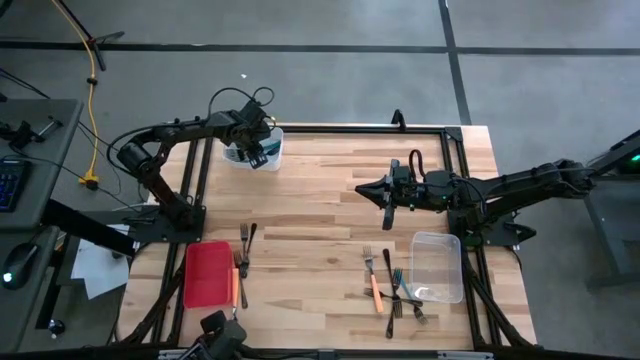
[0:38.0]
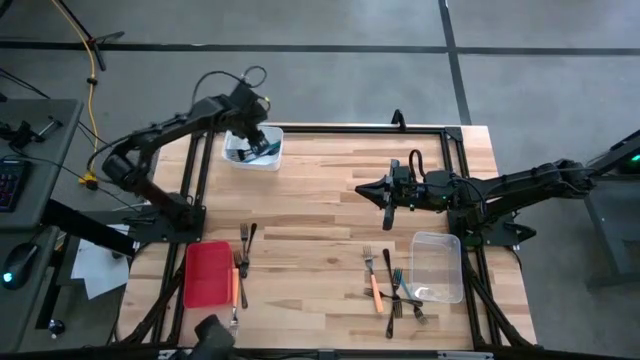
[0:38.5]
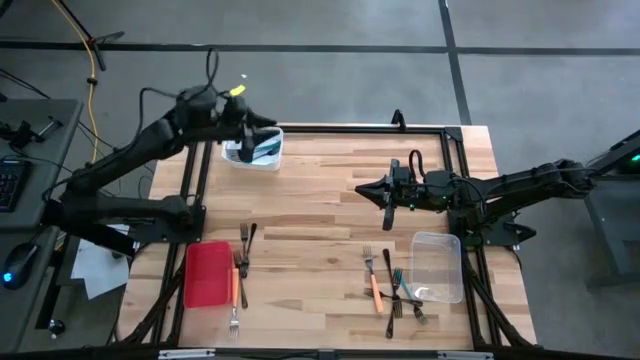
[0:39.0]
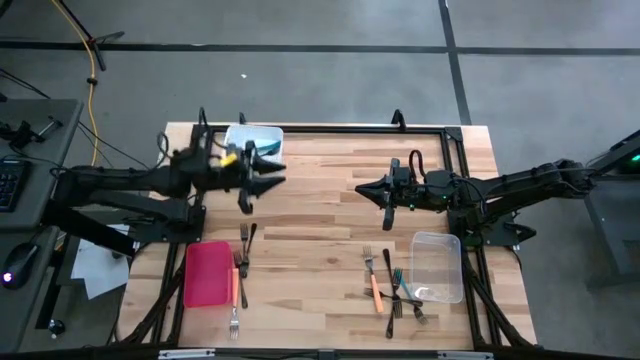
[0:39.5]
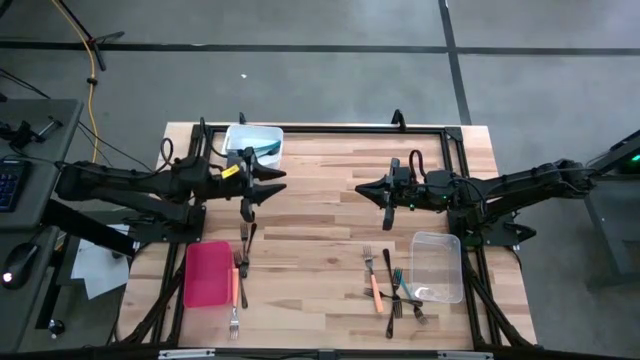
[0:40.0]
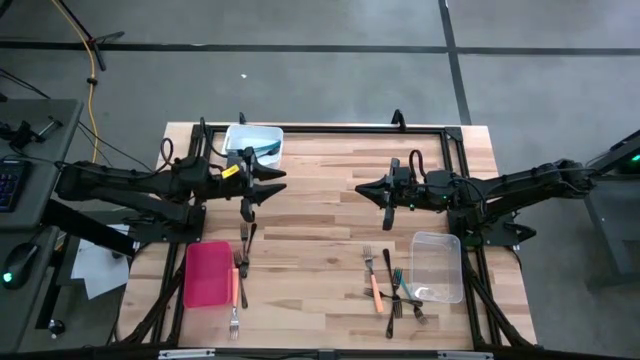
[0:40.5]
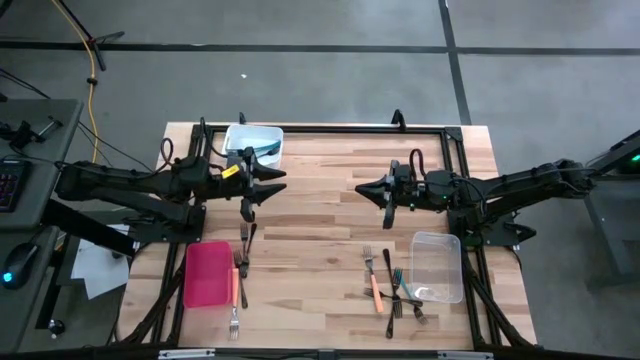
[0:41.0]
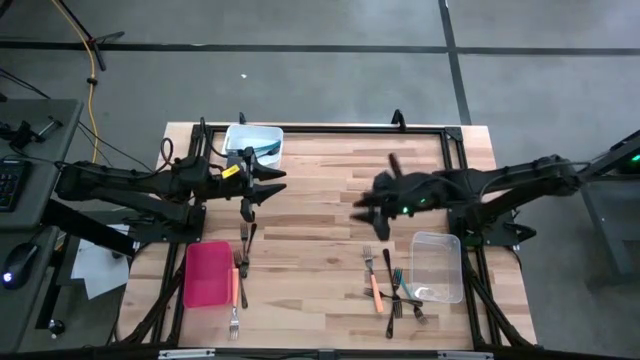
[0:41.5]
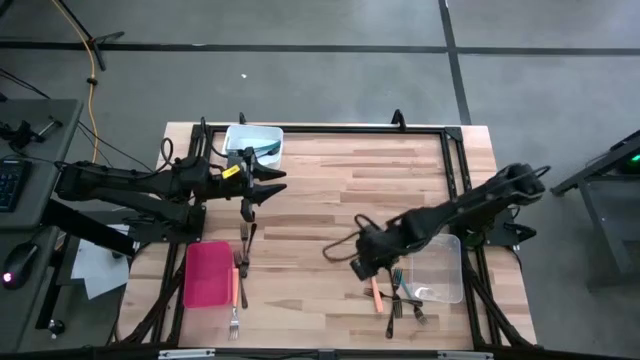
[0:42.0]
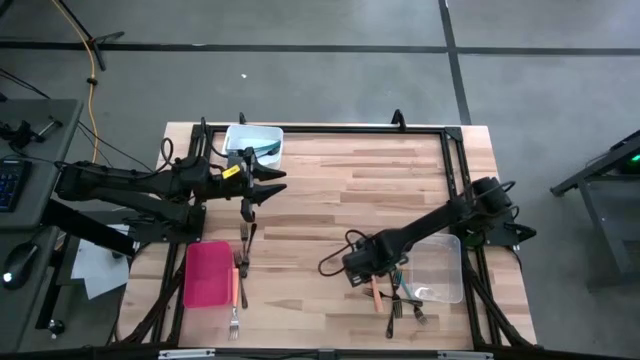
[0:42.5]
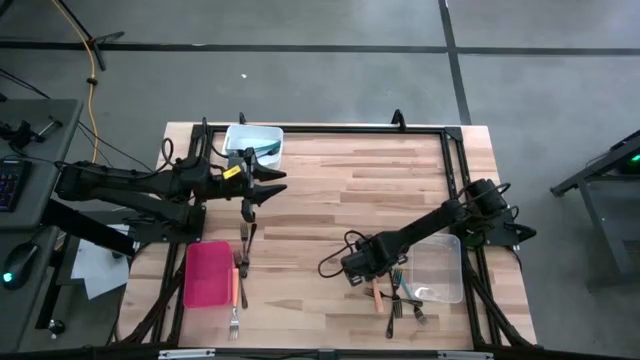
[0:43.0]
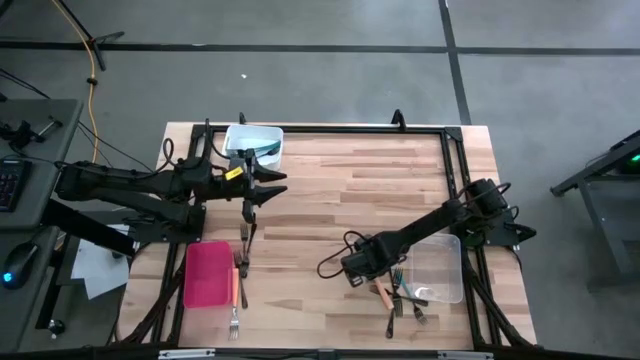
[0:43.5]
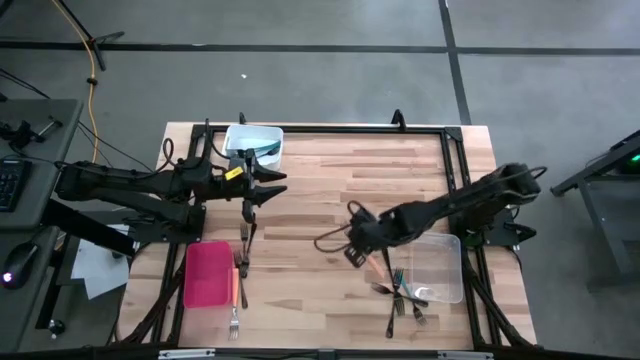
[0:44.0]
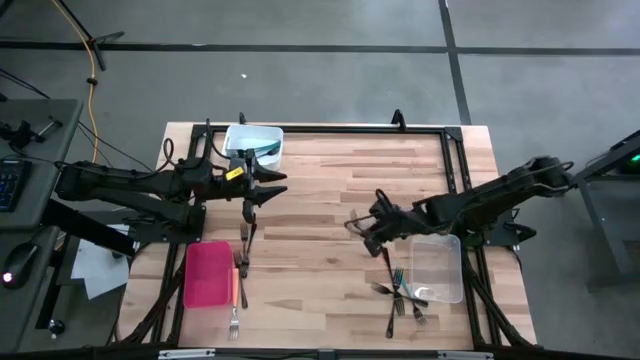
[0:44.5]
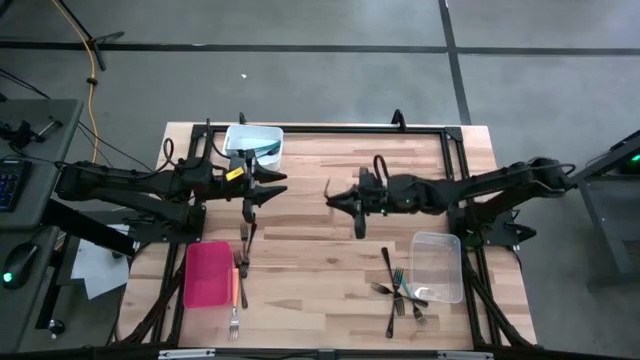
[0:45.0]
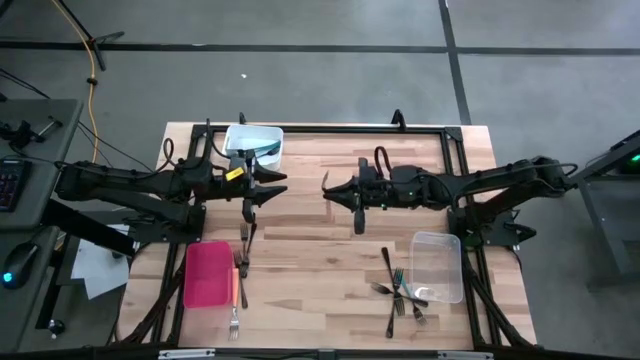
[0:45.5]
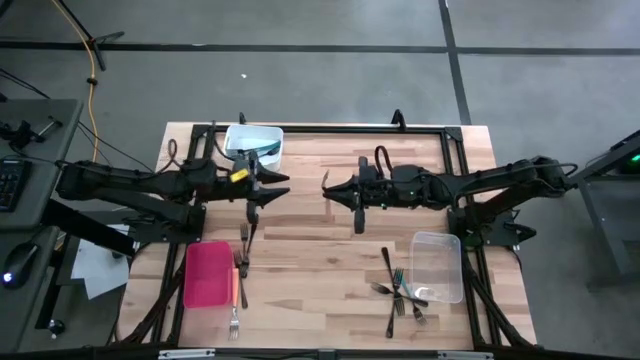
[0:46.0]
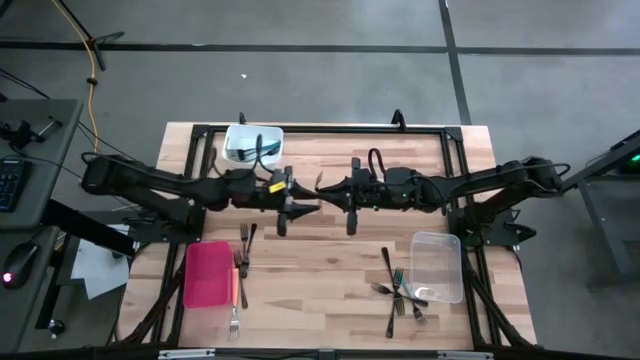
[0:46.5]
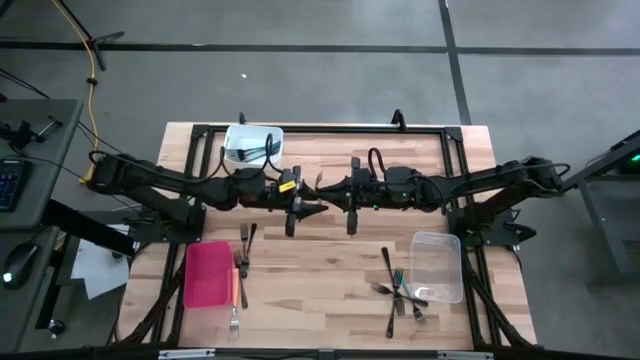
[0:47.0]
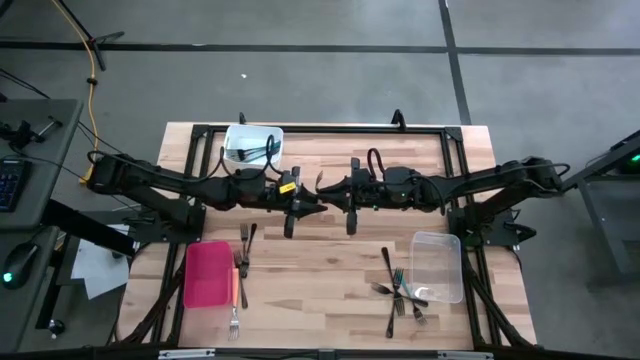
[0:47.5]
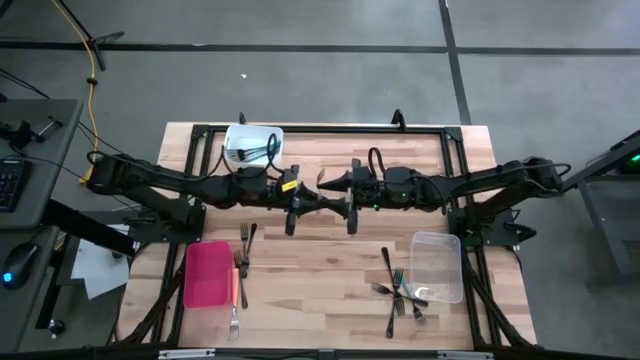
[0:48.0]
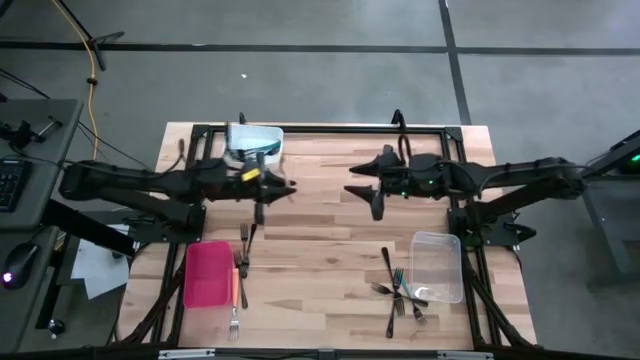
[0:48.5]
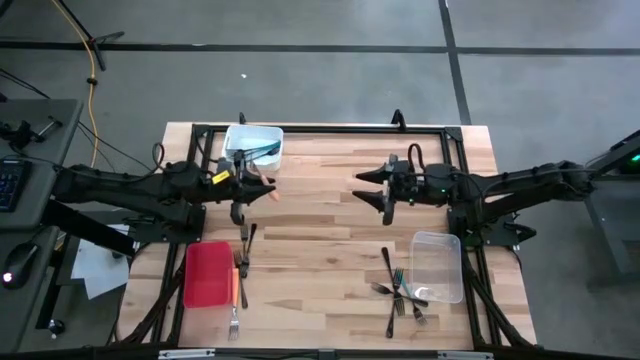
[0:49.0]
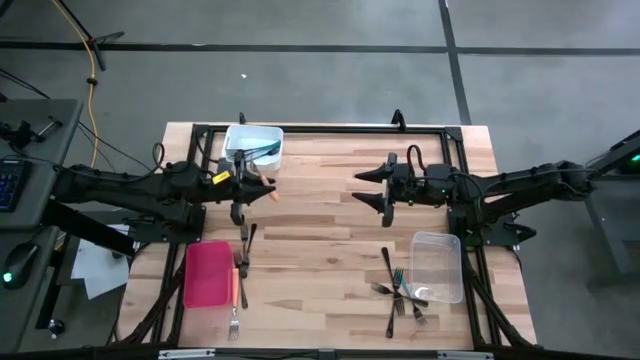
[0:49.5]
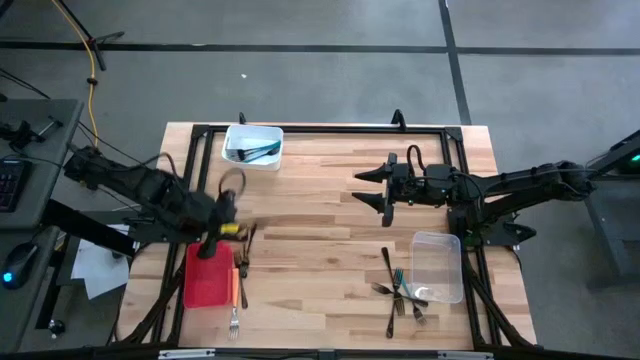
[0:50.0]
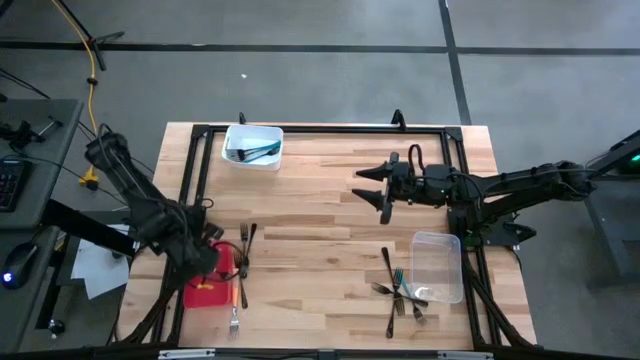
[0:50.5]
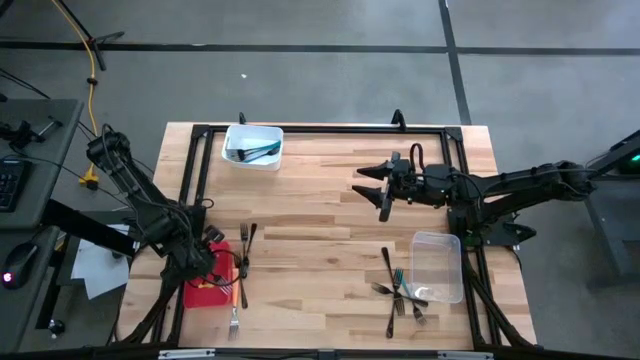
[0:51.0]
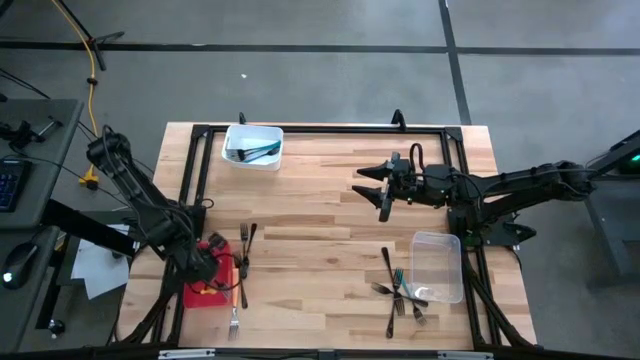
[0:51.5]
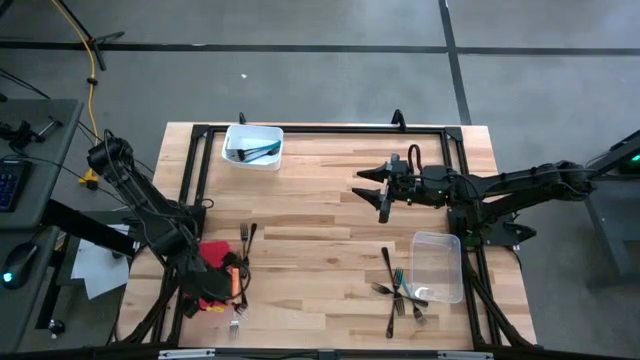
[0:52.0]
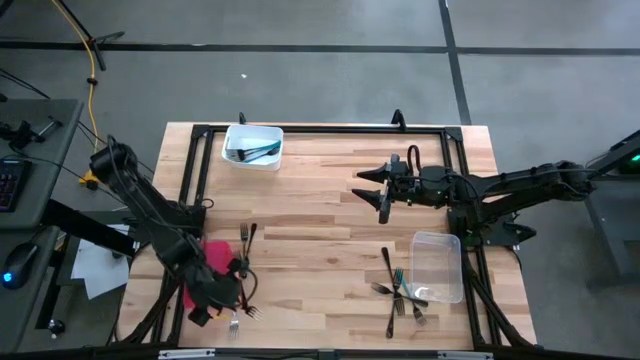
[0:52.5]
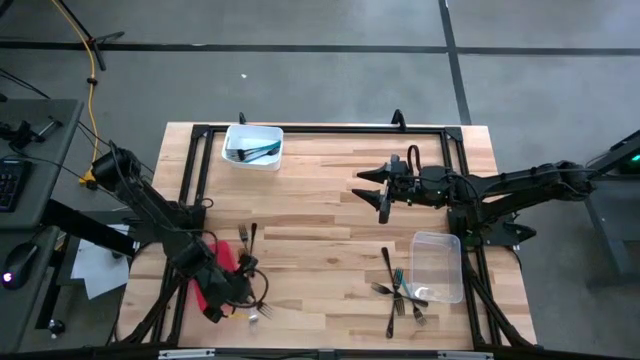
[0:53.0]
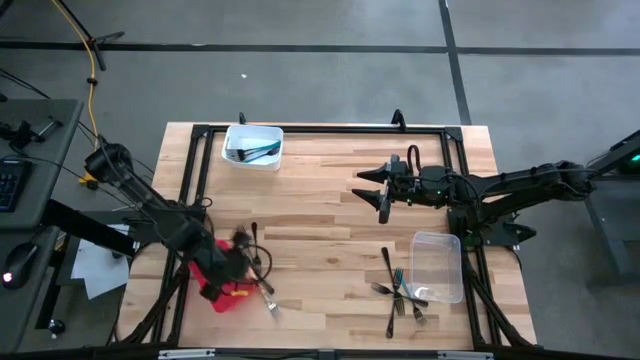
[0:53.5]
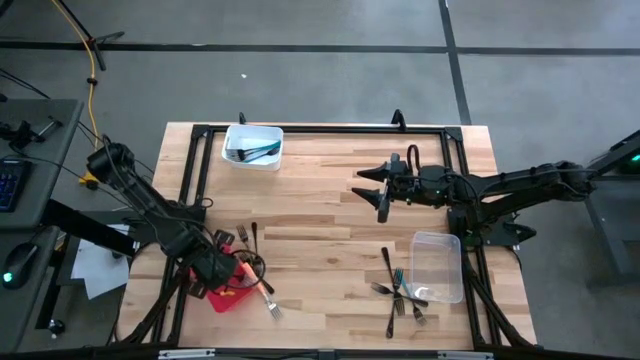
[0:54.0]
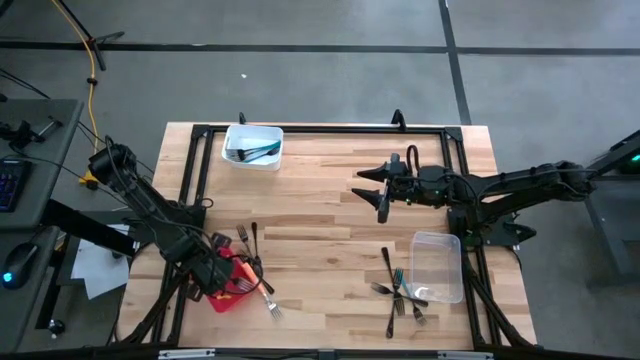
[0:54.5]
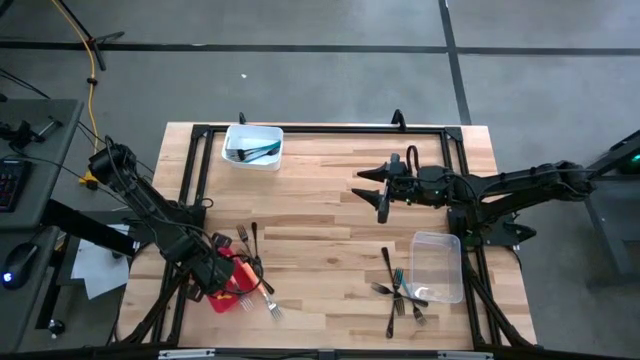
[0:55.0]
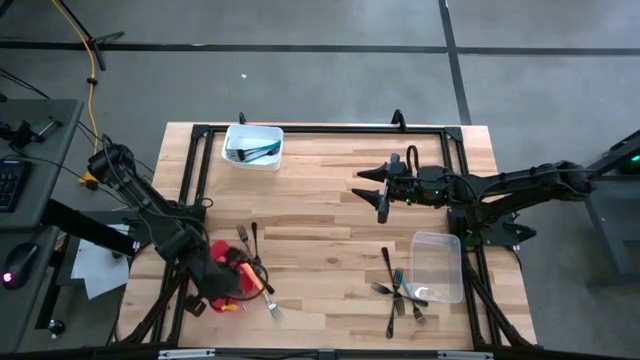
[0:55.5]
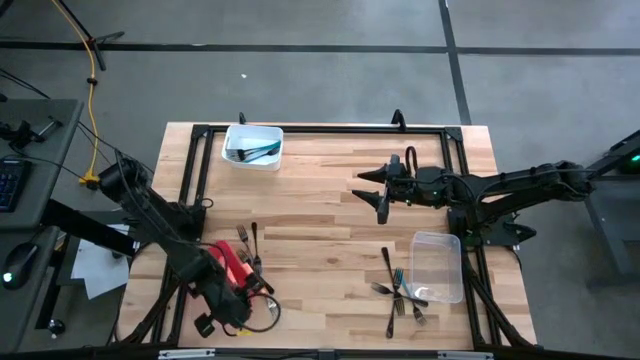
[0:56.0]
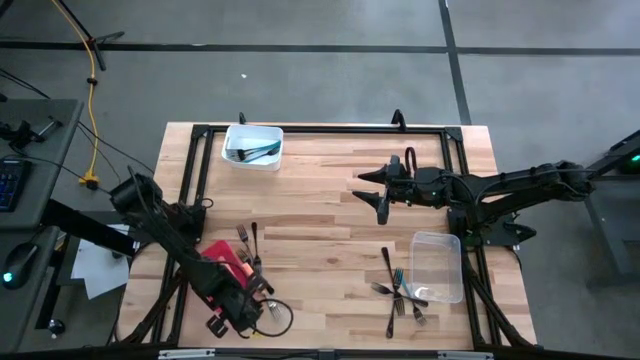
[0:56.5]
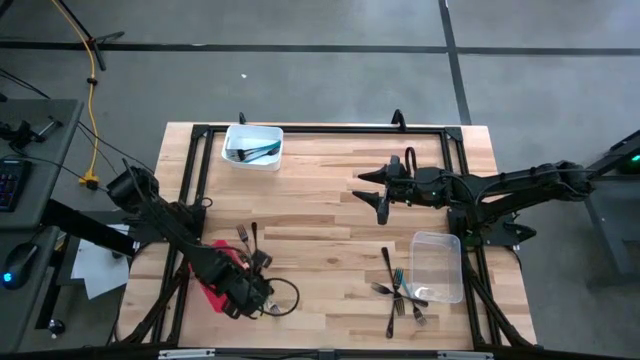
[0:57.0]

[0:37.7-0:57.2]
Task: Sort silverware by color (type)
Put the orange fork into the red bin

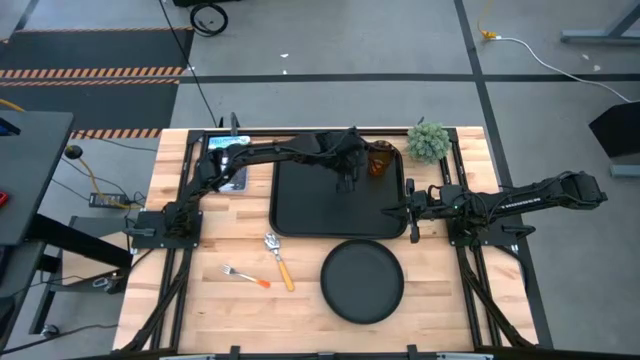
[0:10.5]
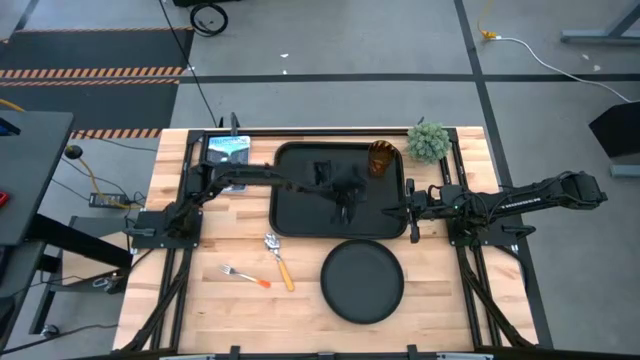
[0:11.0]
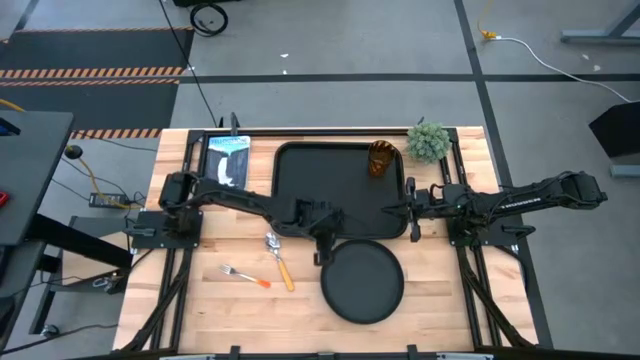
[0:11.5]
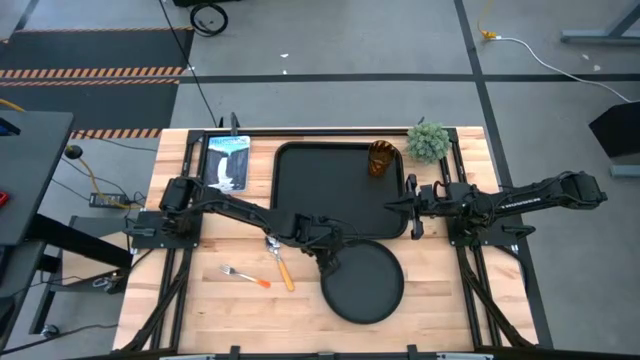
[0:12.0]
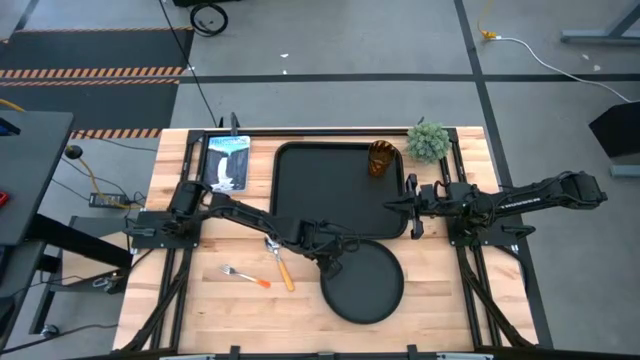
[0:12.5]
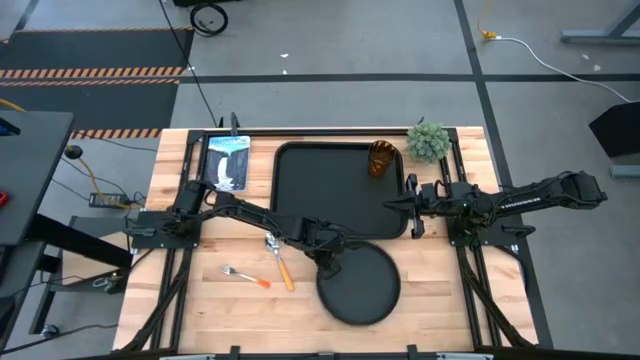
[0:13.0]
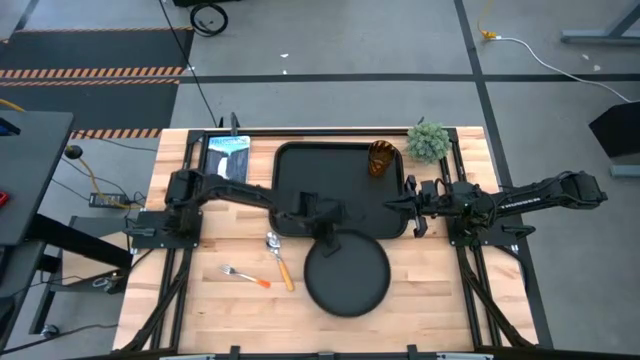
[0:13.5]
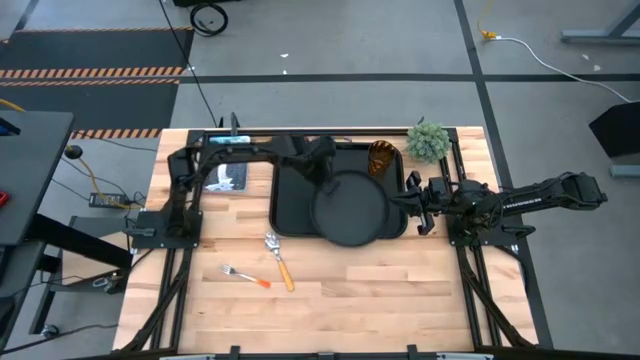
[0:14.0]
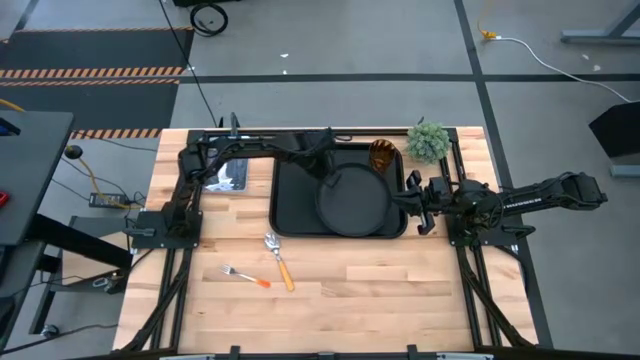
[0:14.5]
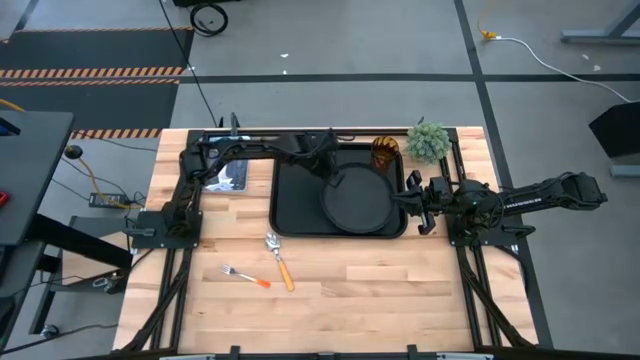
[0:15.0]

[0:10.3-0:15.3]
Task: Pick and place plate/cup/fork/spoon on tray
Put the black plate on the black tray to the bottom left of the brown cup
